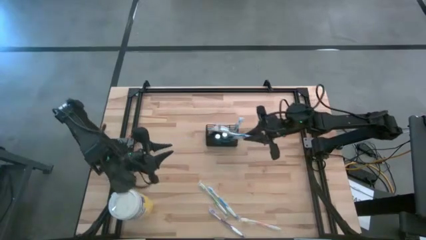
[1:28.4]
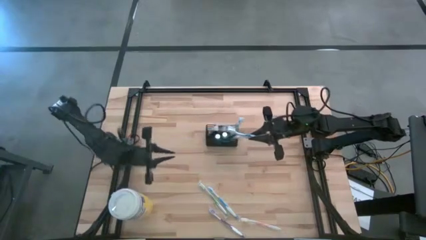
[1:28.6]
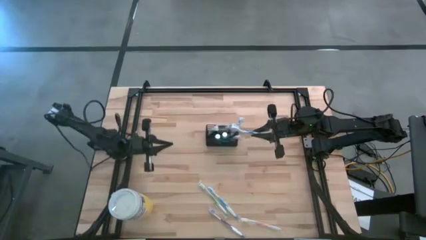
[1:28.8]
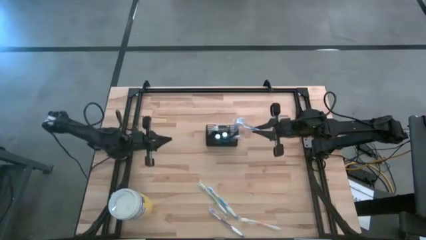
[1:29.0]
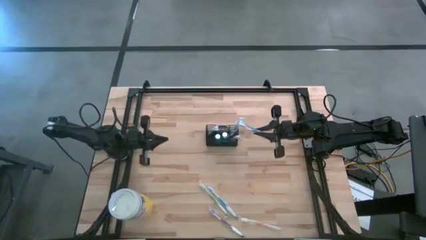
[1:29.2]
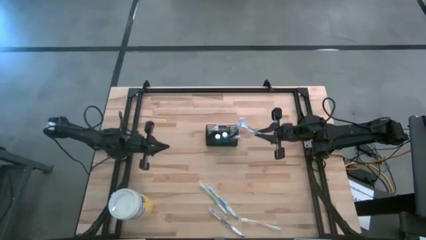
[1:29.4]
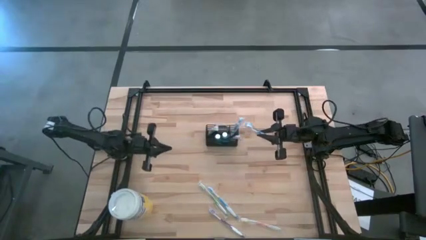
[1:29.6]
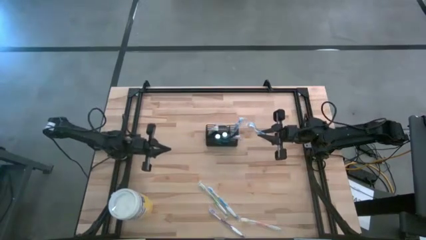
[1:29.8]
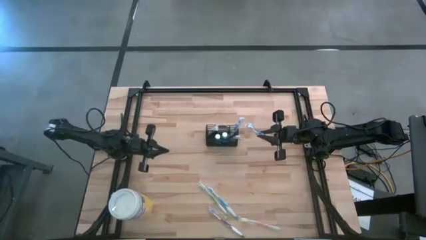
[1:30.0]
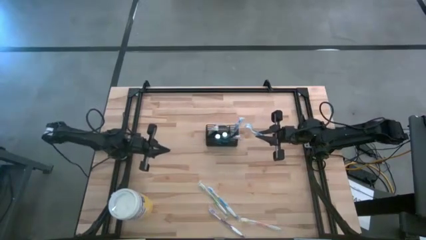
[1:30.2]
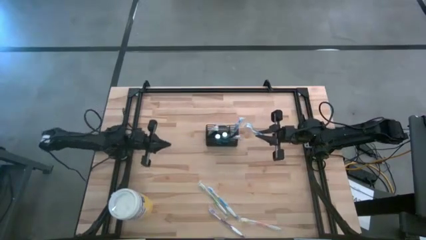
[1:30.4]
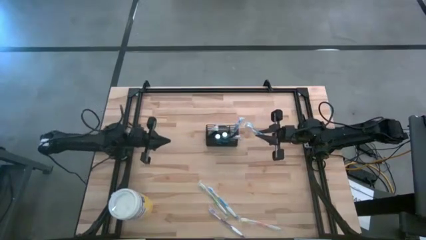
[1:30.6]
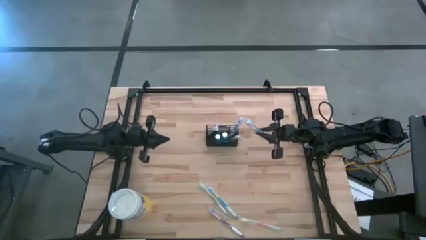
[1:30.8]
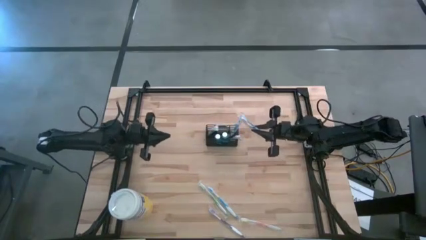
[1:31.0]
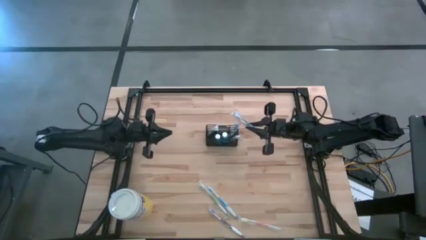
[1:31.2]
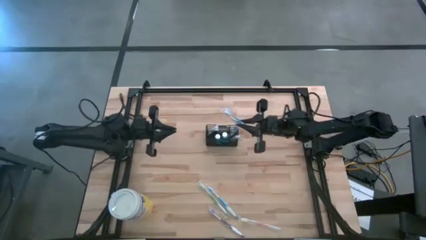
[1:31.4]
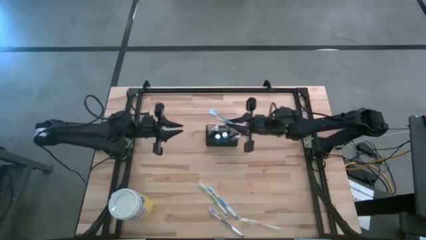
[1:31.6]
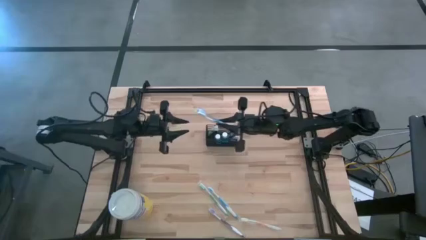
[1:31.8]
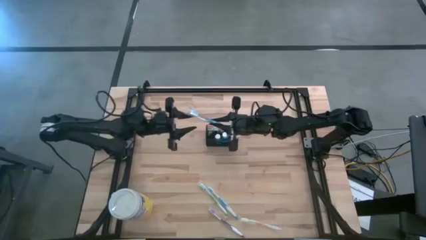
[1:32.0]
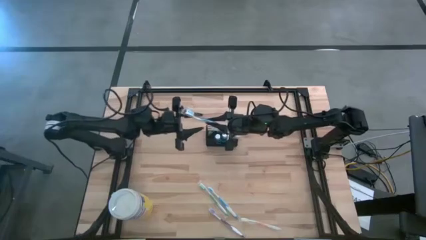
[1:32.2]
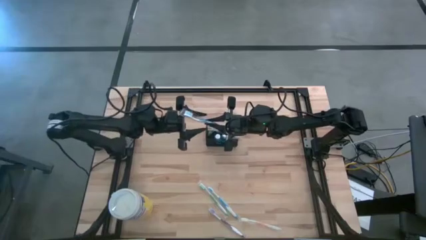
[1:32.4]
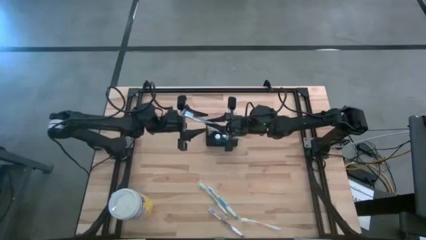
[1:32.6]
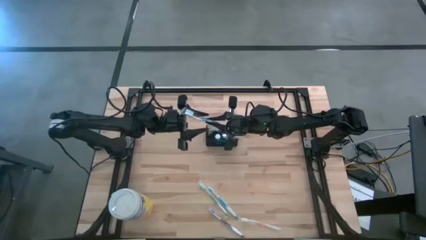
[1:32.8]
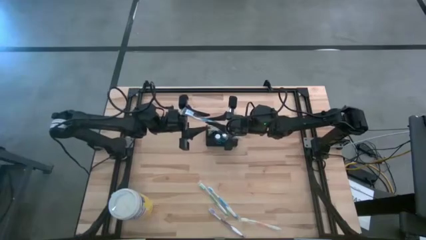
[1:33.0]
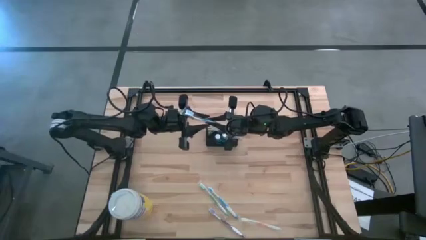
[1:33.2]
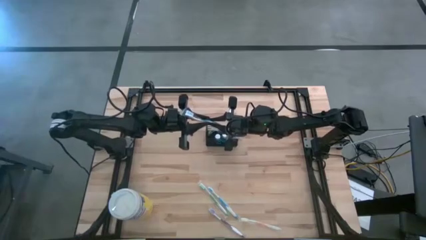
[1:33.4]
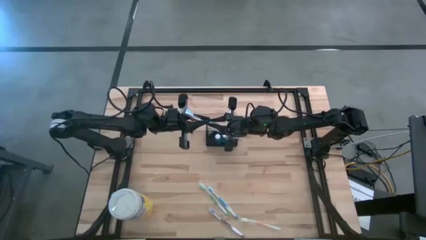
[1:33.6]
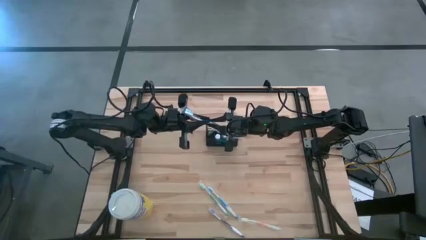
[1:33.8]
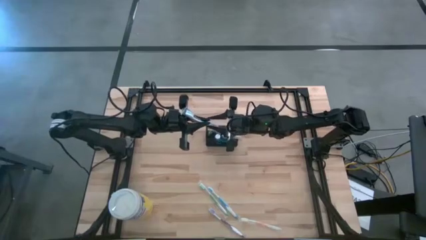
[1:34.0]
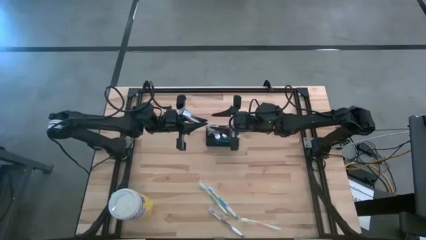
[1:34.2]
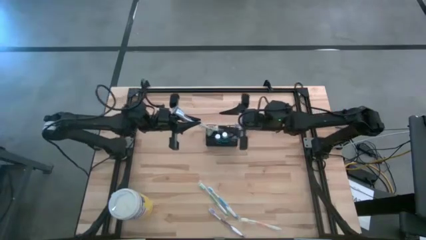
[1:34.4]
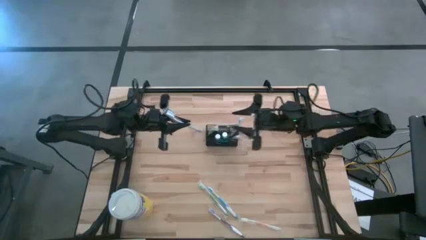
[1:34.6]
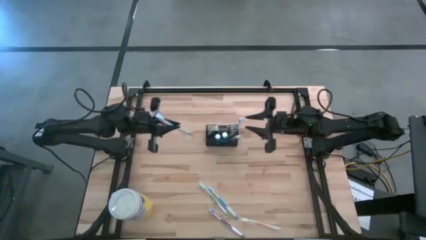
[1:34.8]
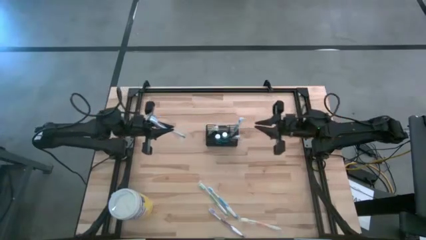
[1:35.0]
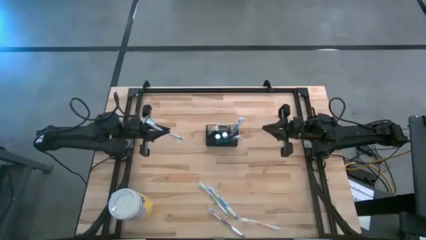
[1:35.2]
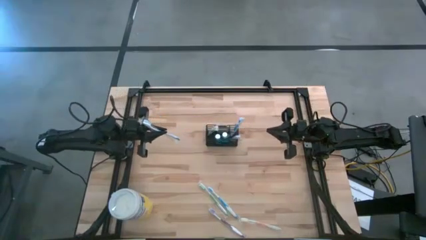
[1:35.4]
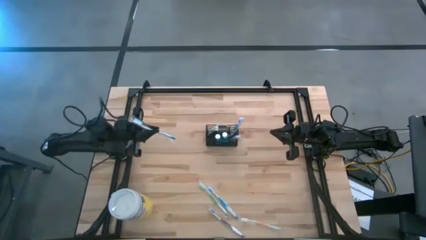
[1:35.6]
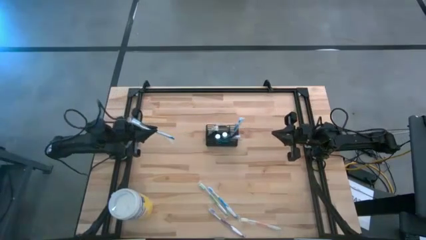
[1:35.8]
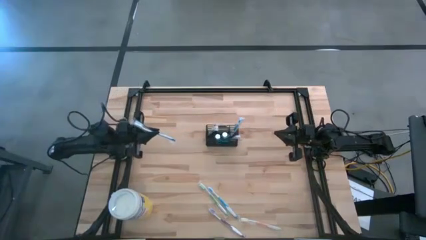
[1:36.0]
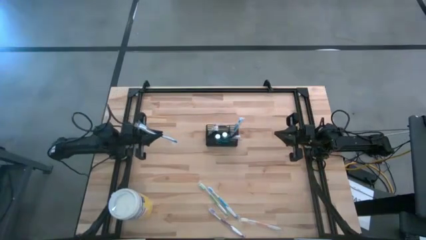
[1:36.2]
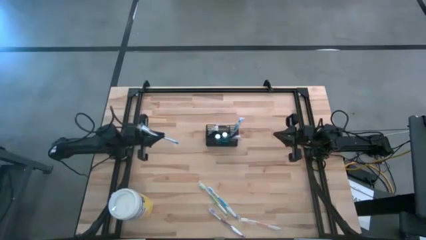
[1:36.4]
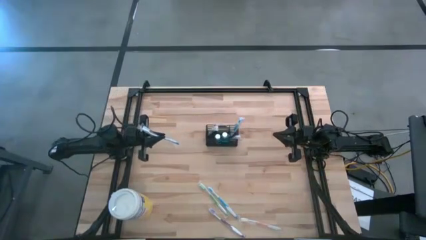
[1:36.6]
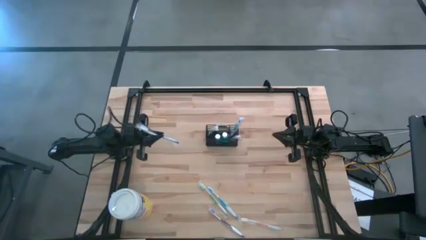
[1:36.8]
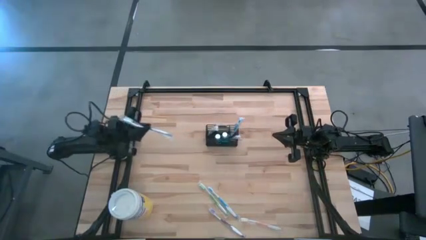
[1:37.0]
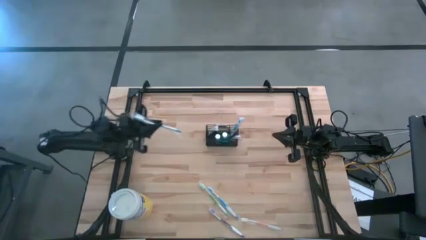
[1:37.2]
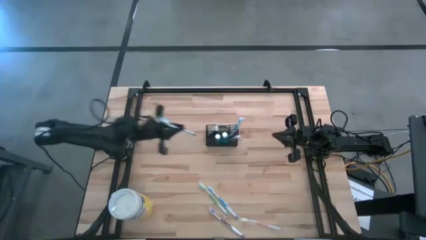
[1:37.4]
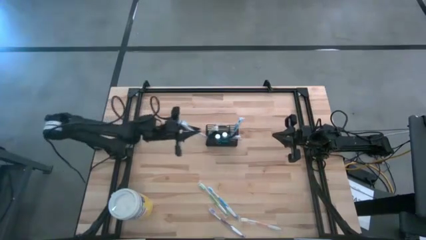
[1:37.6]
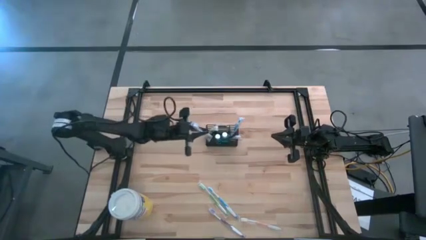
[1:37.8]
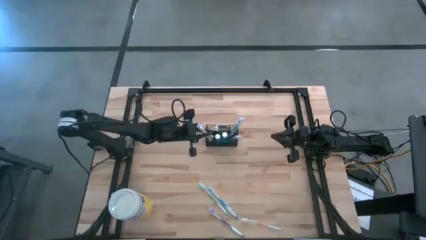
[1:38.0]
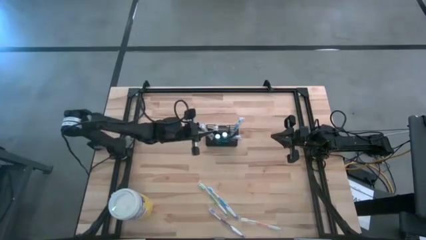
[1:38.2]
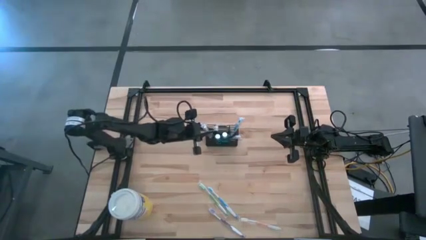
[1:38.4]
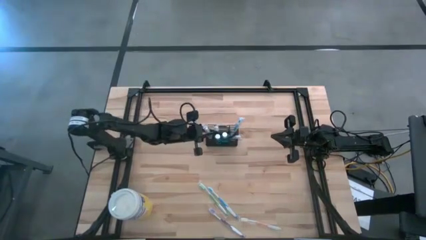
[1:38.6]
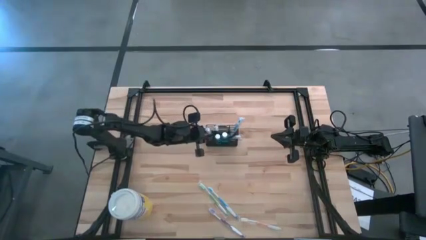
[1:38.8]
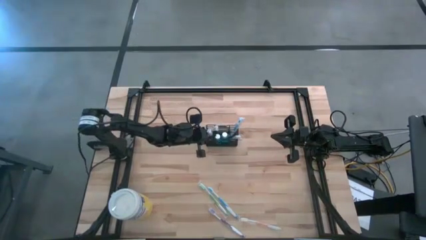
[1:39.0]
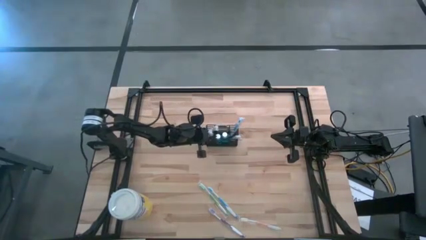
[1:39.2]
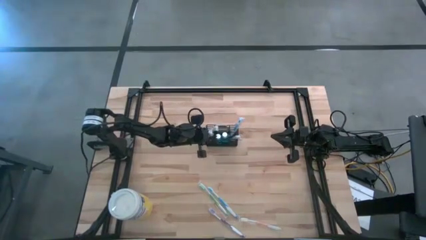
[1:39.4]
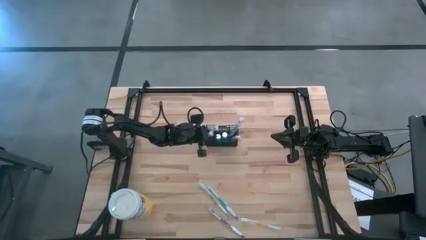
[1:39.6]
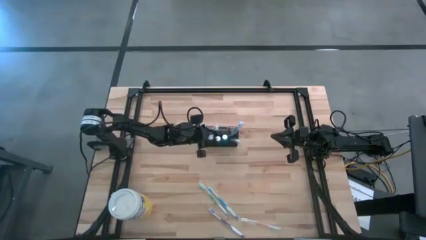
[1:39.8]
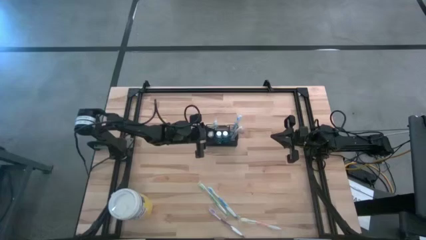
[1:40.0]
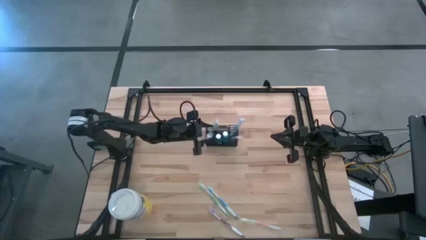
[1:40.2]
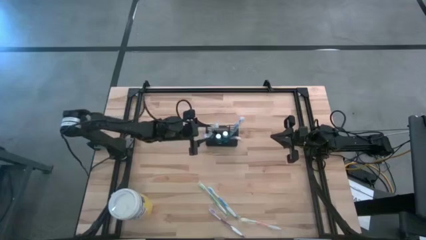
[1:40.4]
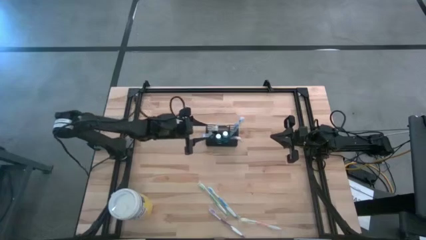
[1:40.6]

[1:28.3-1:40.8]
Task: Pick & Place toothbrushing station
Put the left blue toothbrush into the wire organizer

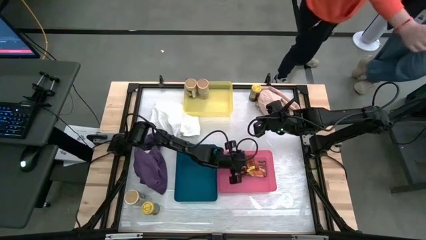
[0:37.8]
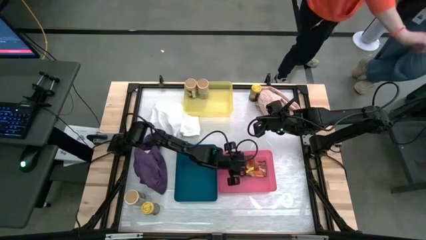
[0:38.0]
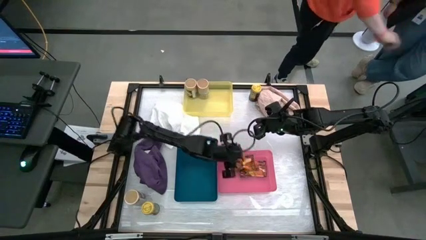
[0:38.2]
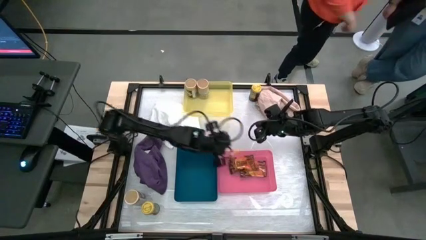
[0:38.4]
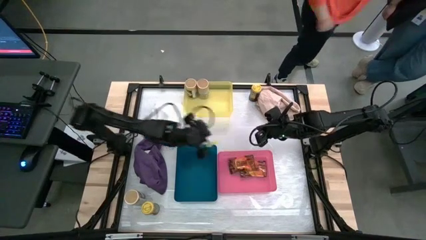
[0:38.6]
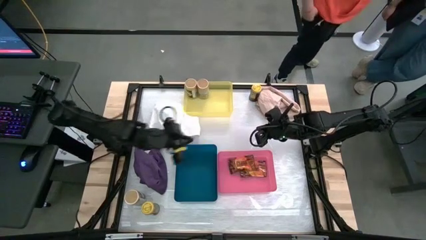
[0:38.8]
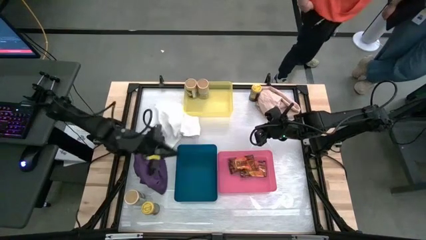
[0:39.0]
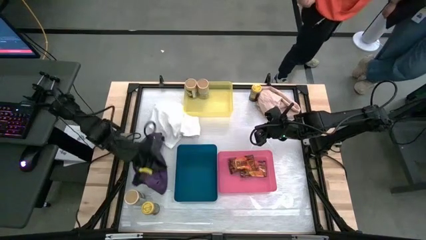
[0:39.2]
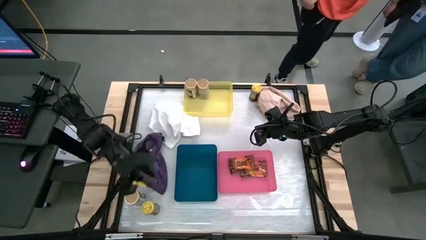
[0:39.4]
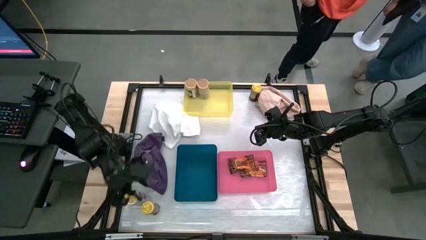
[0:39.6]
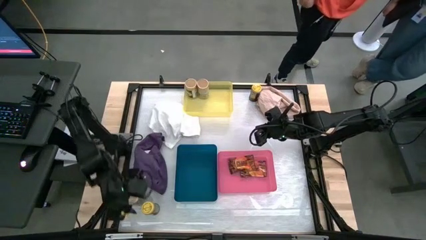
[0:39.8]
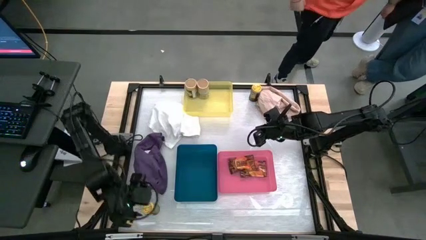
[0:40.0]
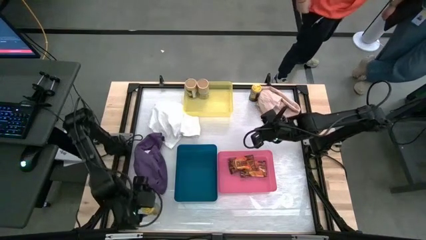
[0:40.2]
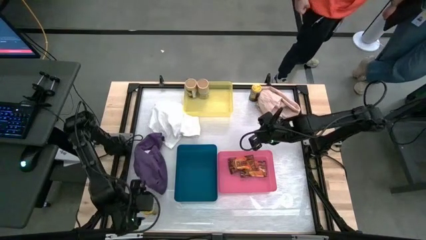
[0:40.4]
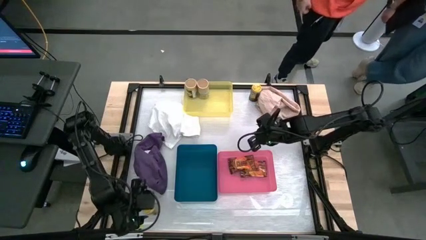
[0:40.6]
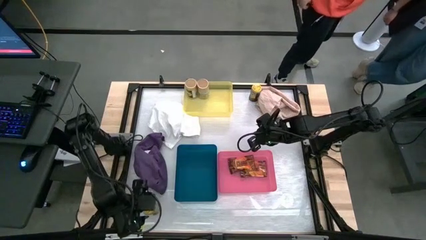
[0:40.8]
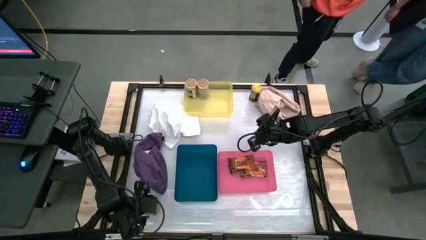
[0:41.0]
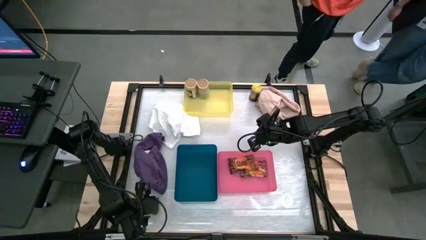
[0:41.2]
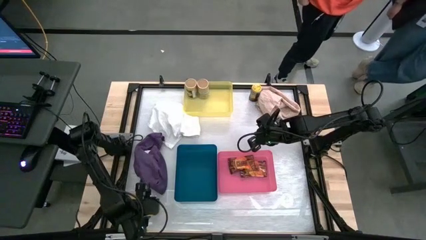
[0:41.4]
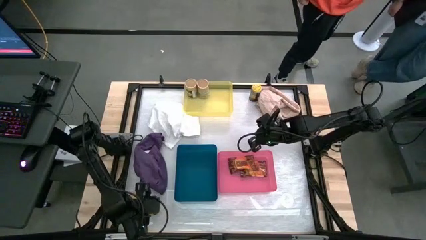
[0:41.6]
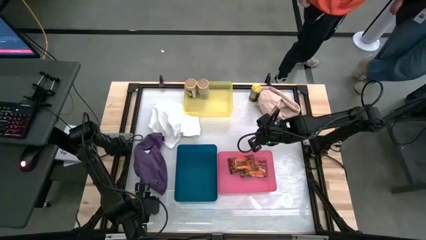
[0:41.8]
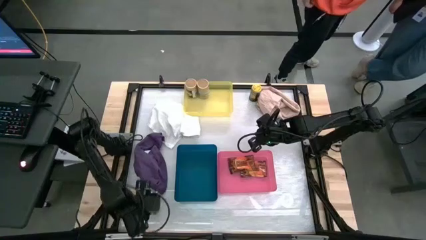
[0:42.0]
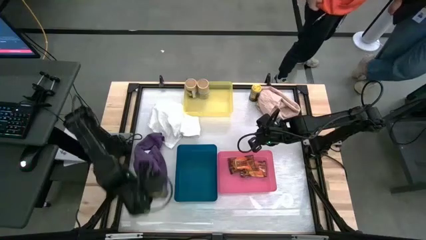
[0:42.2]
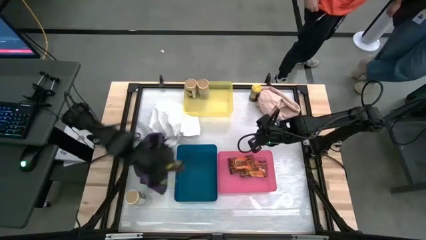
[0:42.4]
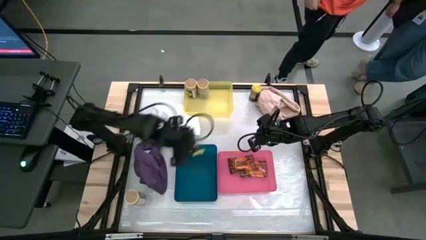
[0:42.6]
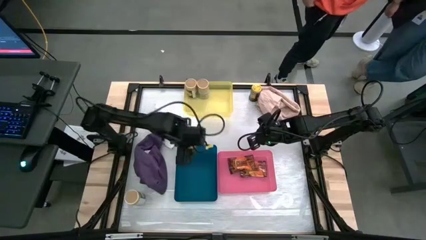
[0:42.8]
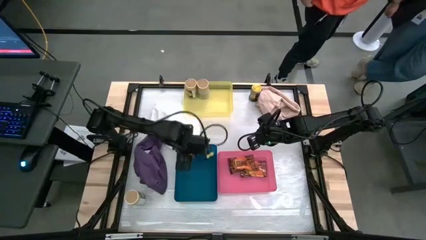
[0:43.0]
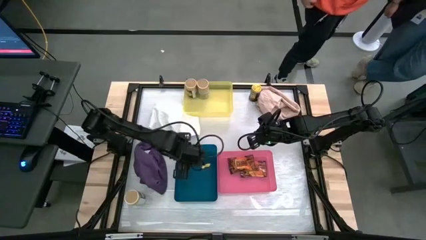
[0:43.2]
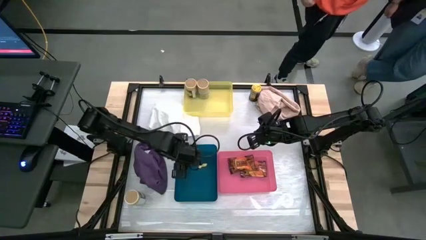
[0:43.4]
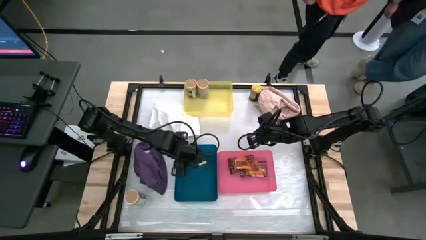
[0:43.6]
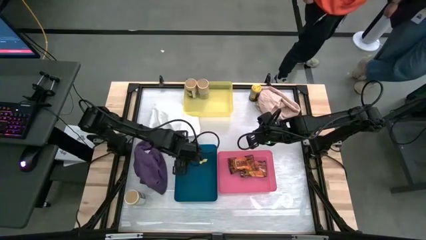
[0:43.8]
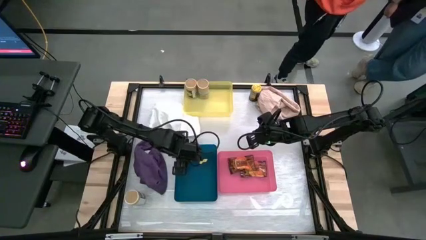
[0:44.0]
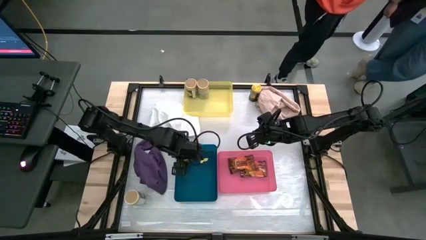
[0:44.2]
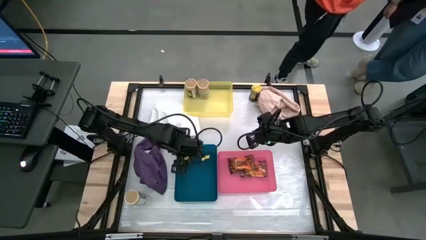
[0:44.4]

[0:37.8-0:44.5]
Task: Sort spices by type
Put the bottom yellow seasoning bottle into the blue bin
